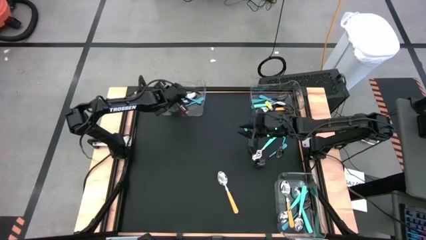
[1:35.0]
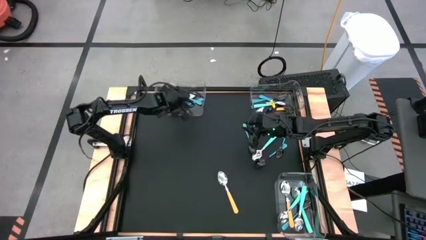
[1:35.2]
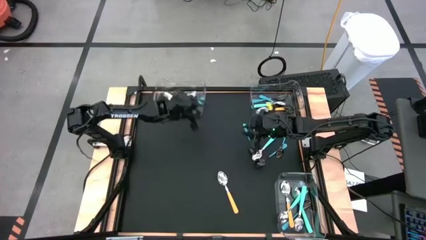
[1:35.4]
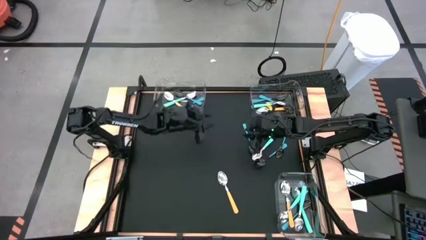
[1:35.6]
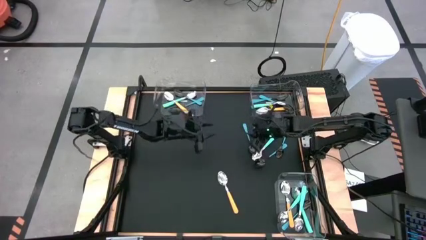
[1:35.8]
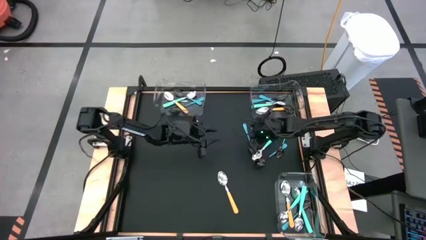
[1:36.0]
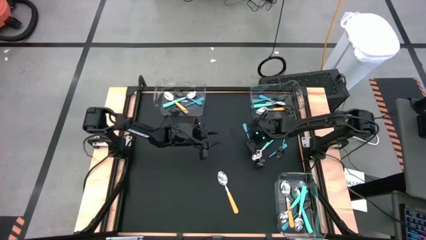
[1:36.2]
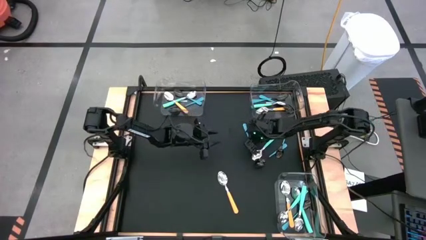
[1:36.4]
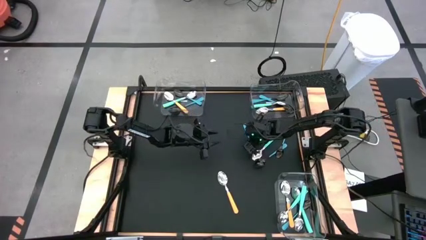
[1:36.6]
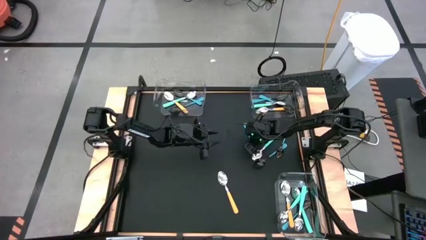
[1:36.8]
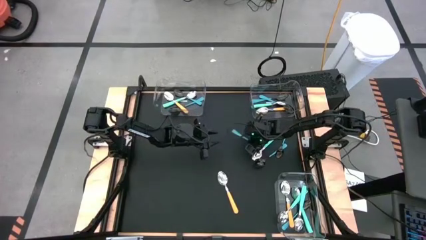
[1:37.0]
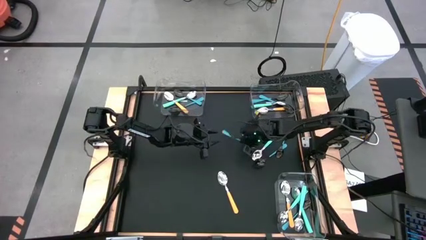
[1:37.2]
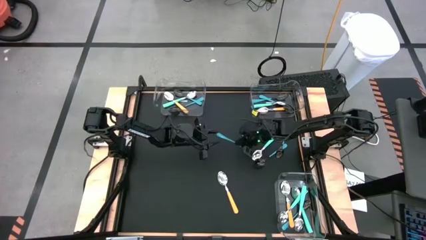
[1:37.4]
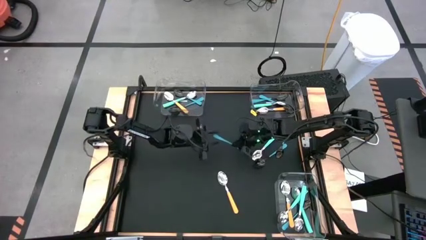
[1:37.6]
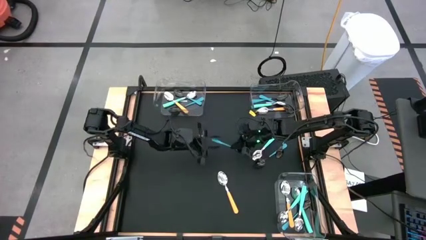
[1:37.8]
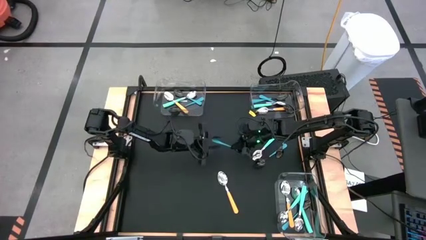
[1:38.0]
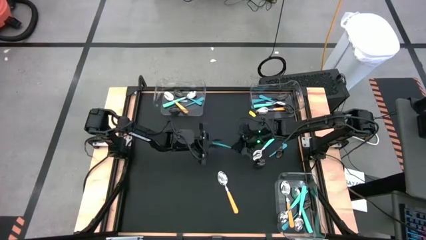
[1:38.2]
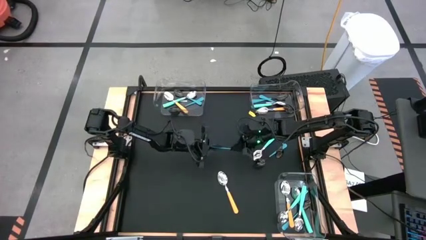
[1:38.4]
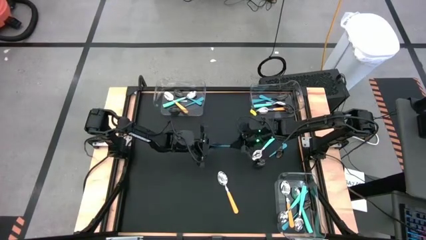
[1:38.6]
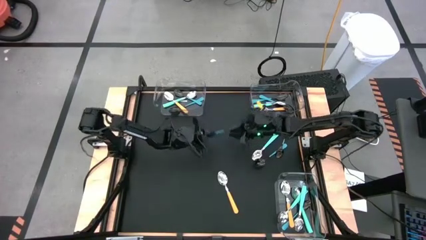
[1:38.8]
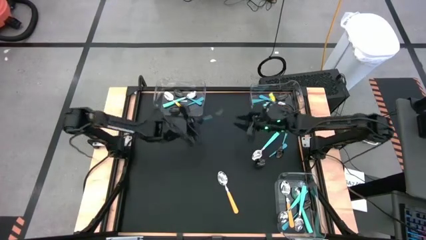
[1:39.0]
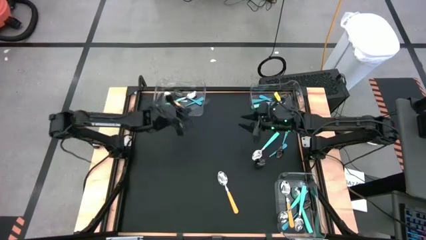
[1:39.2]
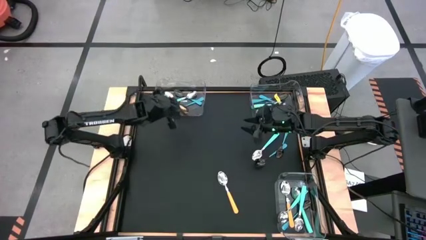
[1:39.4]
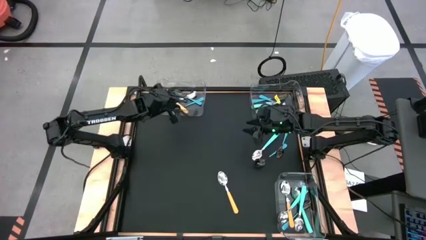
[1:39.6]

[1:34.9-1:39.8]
Task: Sort silverware by color (type)
Put the blue spoon into the top left transparent bin

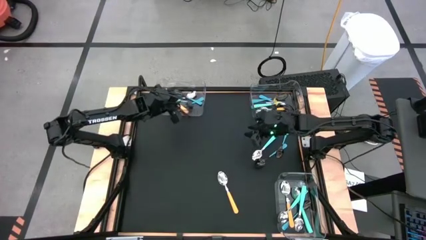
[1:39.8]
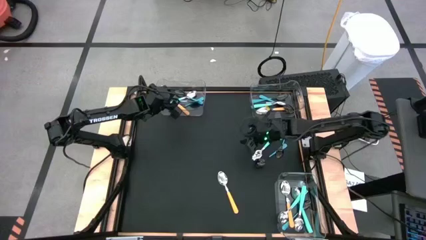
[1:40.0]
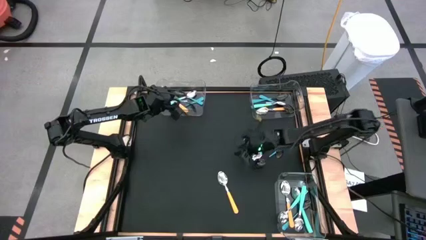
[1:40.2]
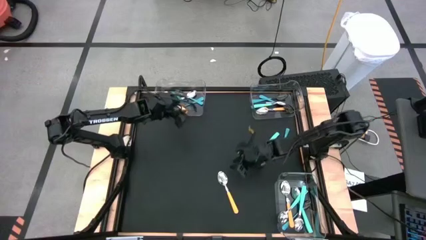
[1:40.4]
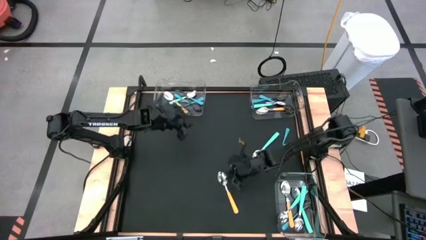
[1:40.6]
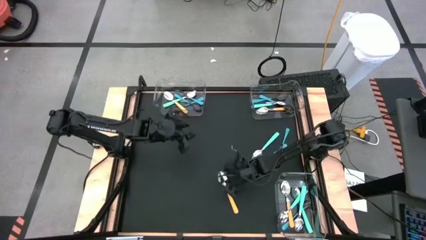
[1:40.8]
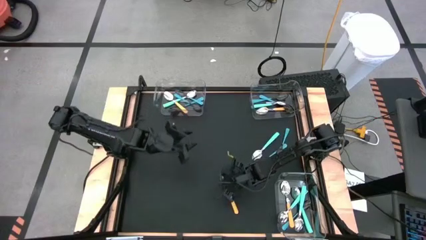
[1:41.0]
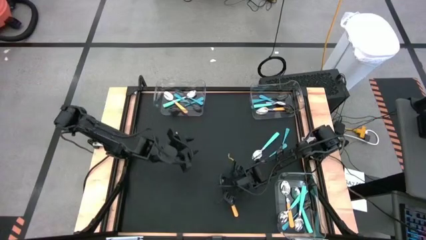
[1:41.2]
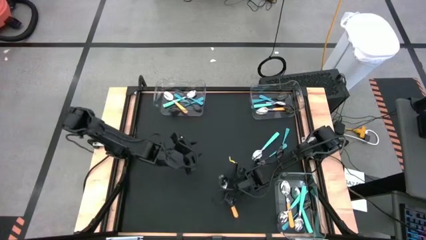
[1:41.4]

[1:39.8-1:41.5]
Put the yellow spoon into the bottom transparent bin

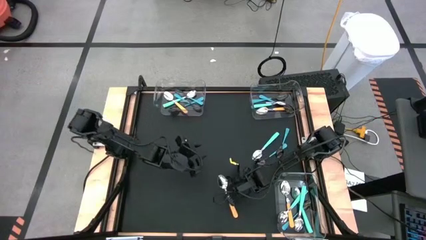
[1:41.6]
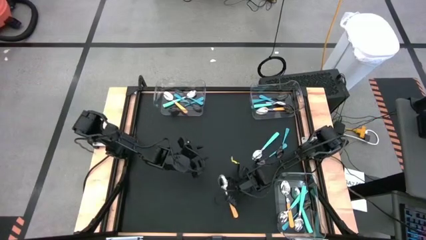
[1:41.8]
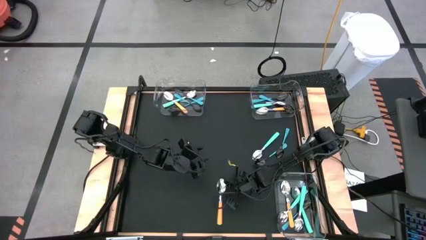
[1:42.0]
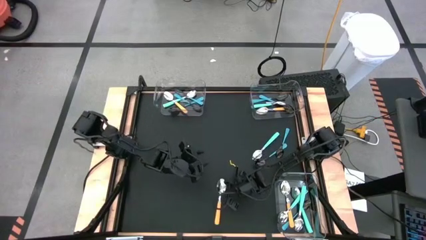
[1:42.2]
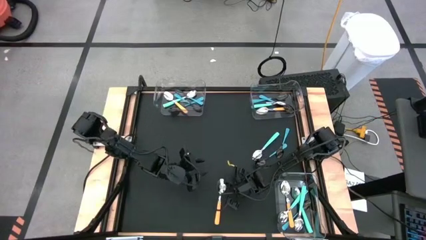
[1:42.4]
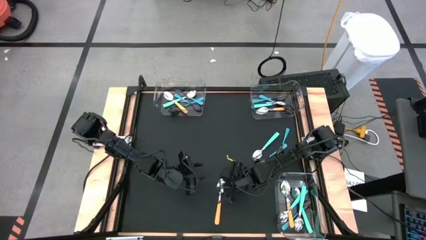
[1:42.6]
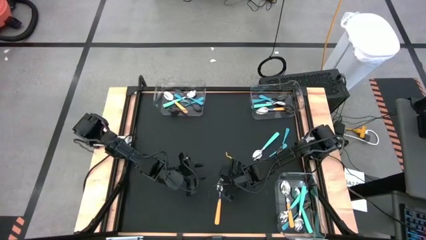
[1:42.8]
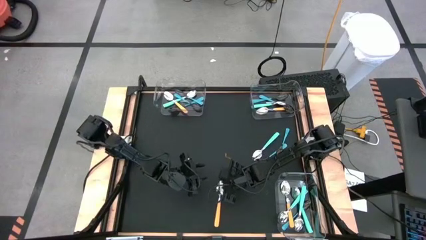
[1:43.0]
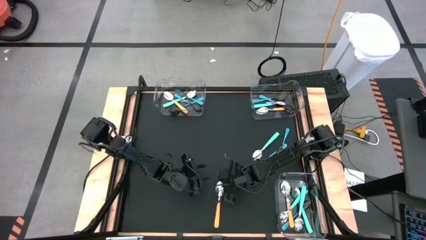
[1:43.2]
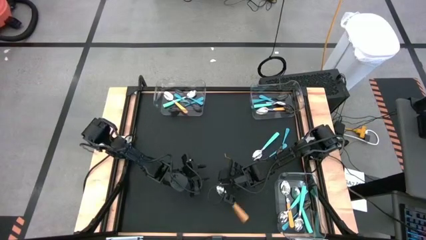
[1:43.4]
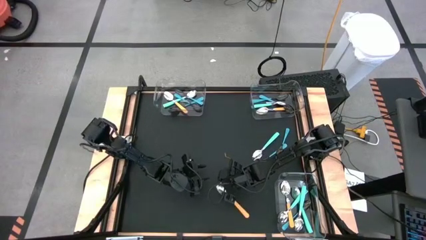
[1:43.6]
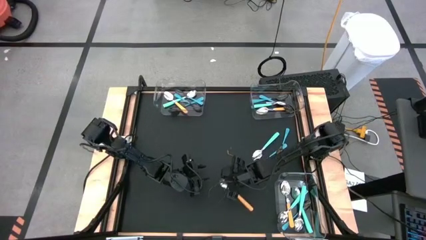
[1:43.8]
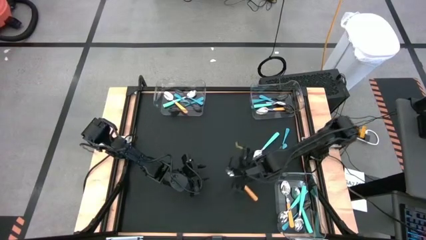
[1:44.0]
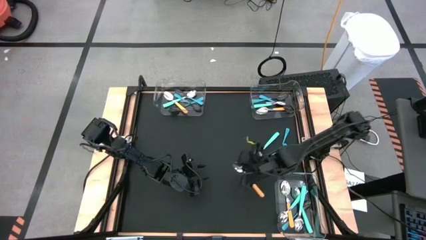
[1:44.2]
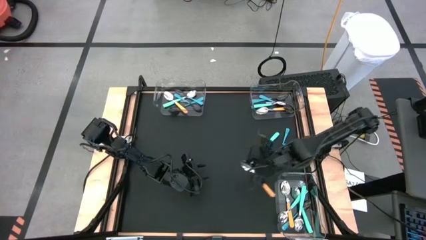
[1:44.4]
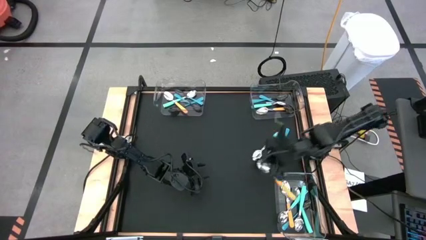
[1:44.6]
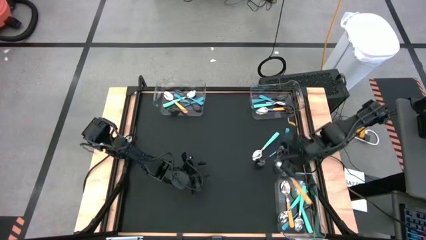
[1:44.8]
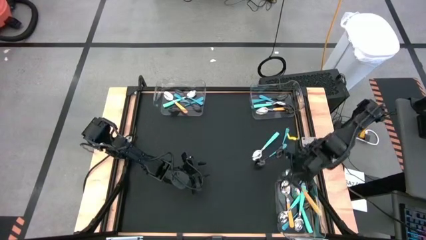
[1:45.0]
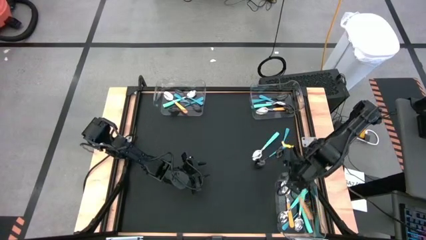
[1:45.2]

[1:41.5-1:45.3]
Put the yellow spoon into the bottom transparent bin

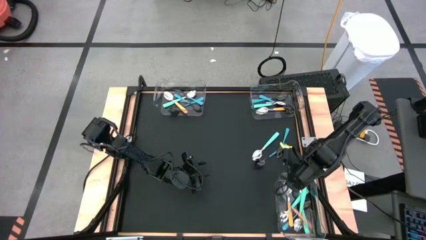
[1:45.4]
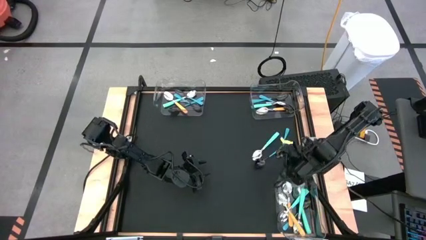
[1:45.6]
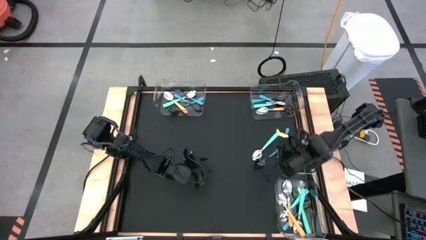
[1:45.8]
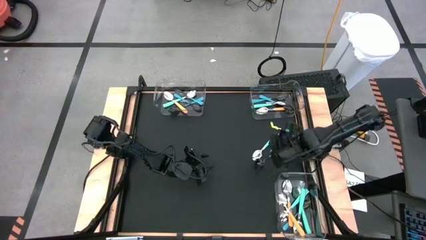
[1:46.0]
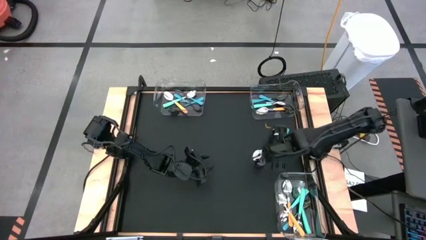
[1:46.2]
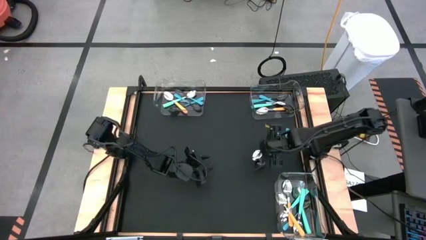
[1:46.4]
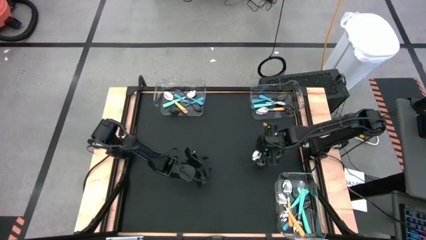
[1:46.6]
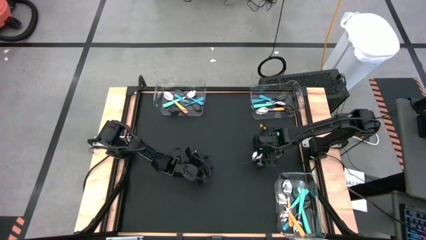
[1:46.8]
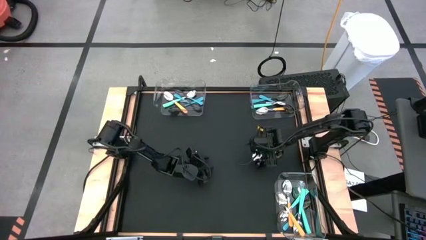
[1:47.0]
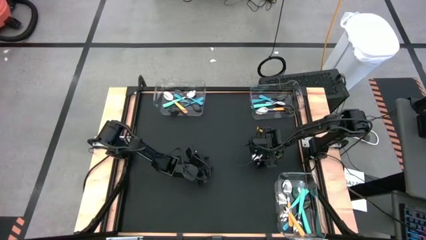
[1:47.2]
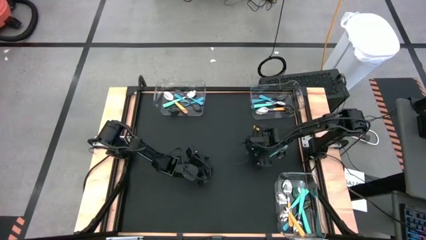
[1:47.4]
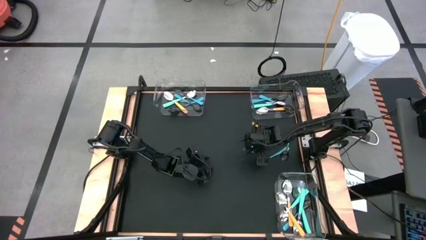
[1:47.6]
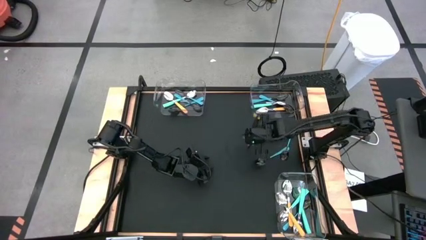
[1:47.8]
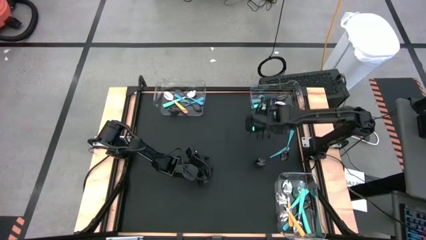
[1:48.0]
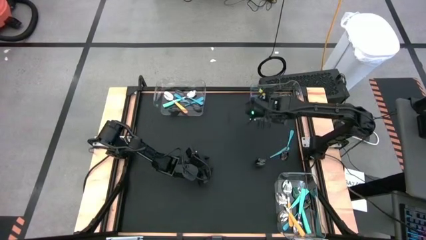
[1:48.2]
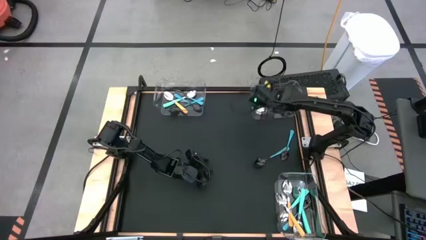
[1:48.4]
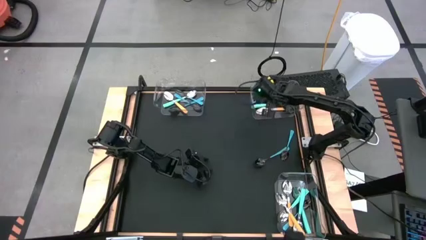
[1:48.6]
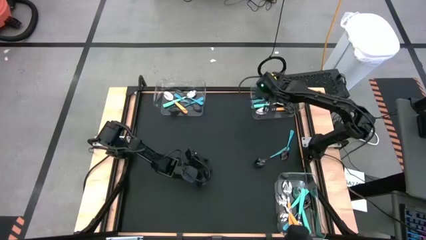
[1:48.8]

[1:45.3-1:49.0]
Put the light blue spoon into the top right transparent bin

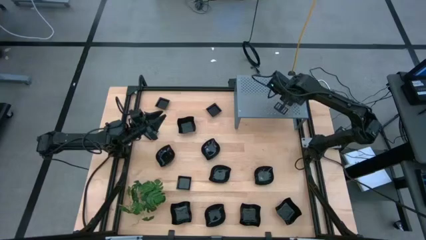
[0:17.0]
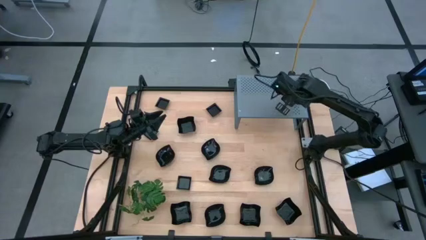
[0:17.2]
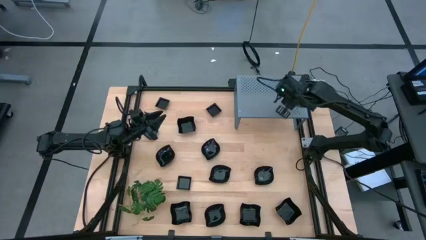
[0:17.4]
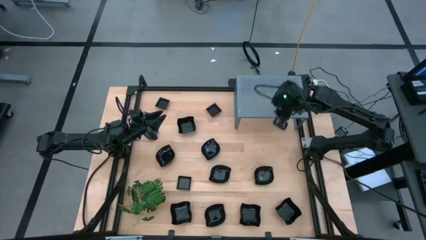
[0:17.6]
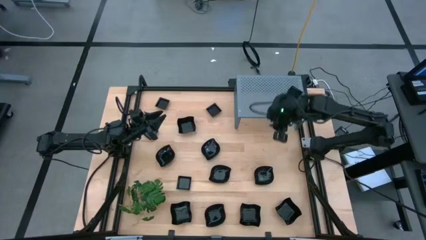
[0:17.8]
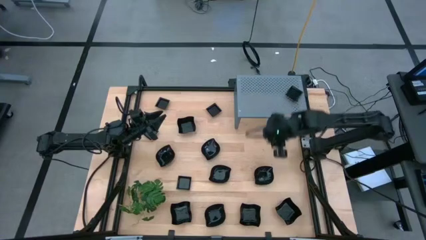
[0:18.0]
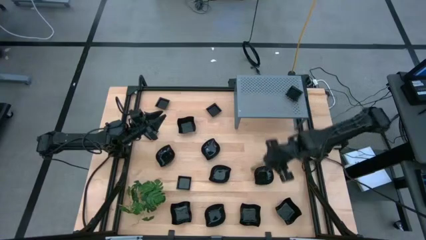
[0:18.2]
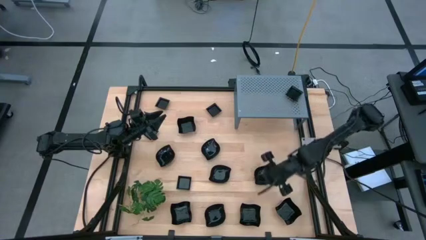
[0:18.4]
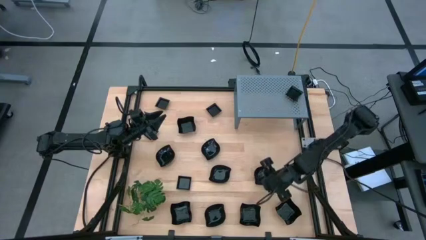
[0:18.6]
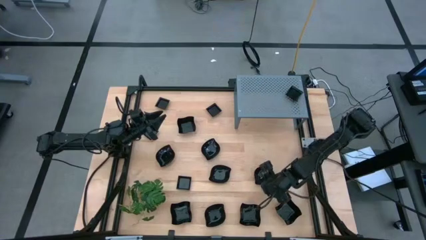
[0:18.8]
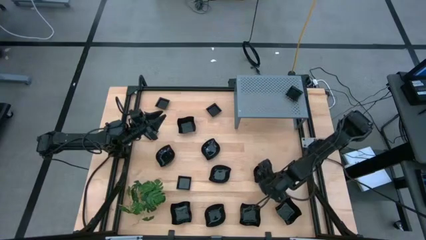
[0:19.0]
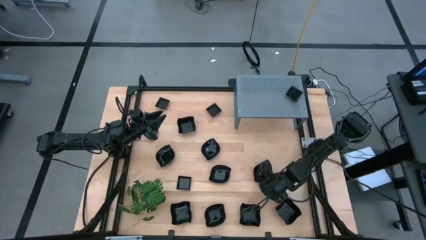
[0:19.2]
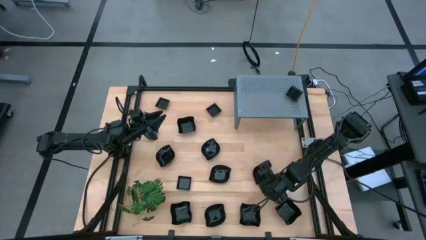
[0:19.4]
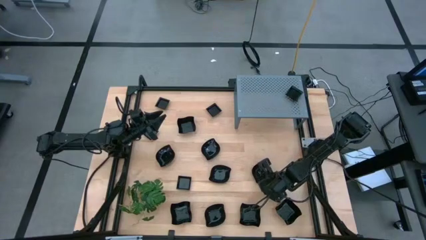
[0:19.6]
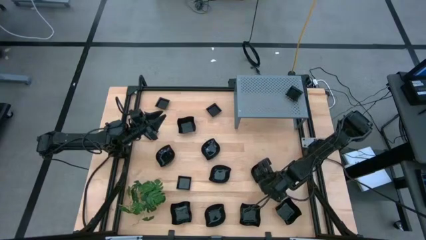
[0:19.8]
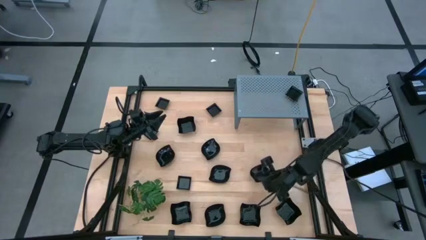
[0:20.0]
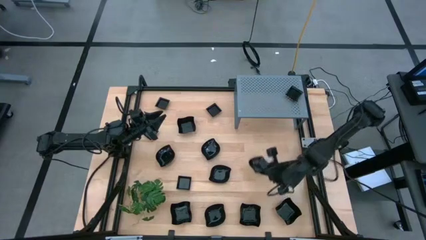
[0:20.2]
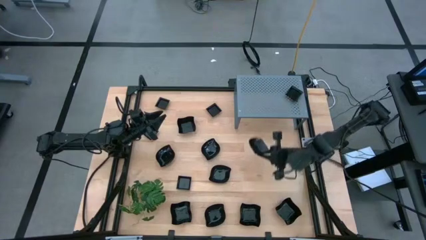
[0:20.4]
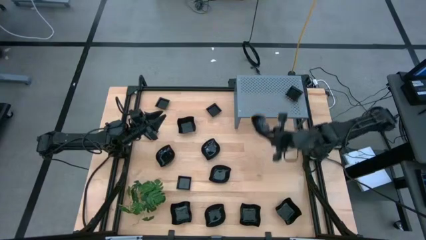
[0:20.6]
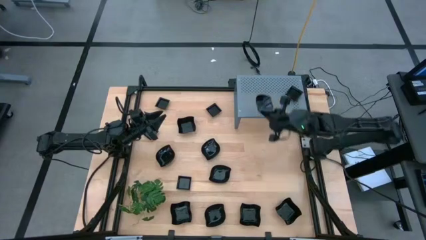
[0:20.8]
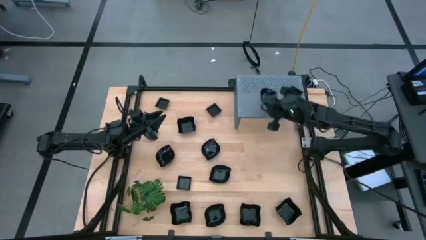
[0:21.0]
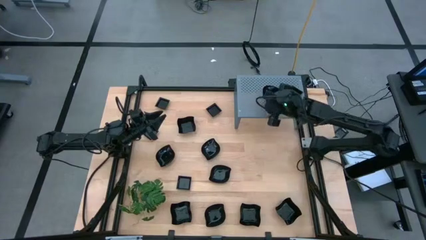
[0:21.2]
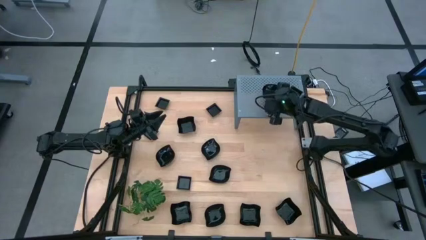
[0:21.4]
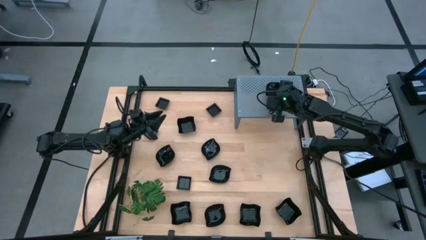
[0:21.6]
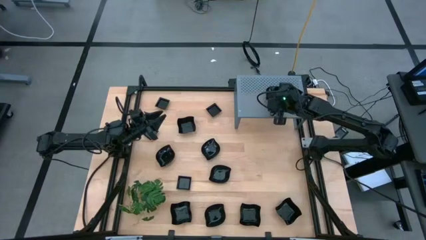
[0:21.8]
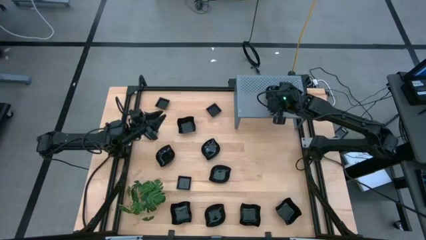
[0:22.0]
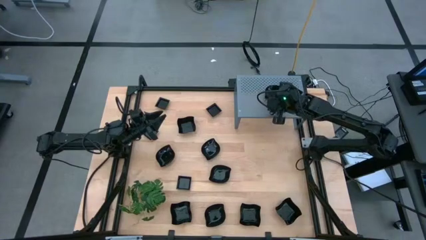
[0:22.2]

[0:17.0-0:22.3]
Task: Pick & Place Mini shaped plates
Put the black leaf-shaped plate on the shelf
